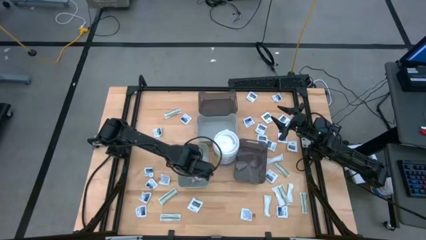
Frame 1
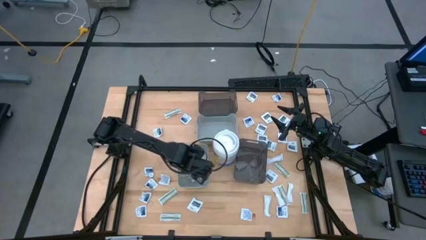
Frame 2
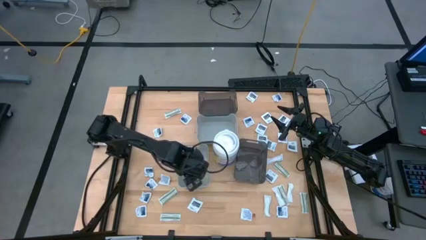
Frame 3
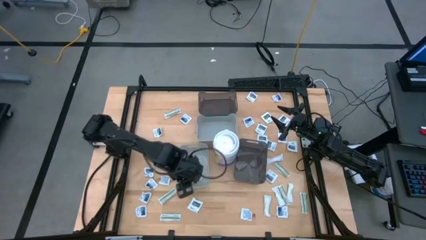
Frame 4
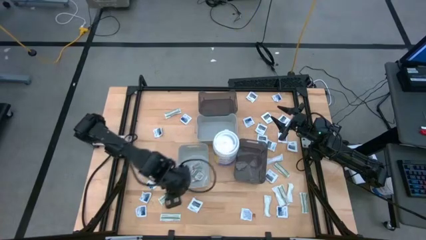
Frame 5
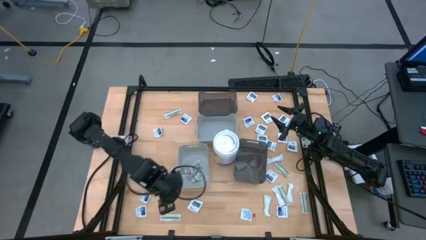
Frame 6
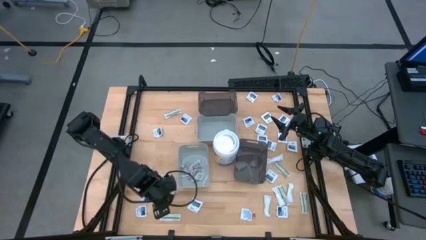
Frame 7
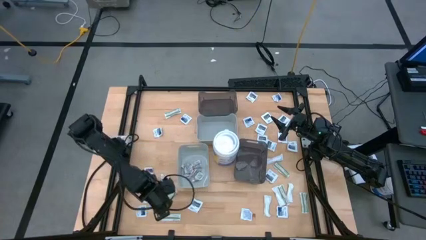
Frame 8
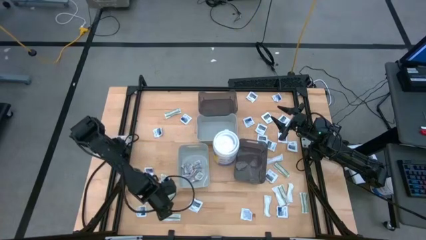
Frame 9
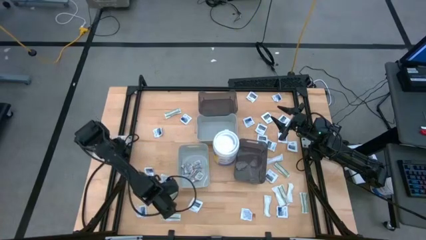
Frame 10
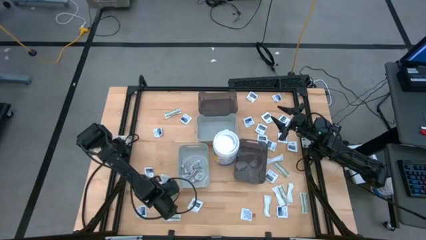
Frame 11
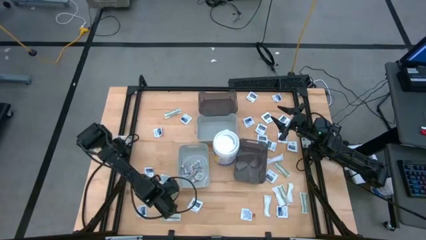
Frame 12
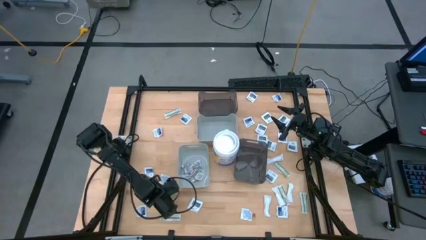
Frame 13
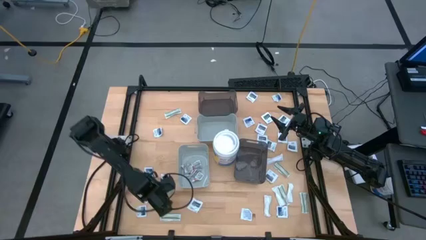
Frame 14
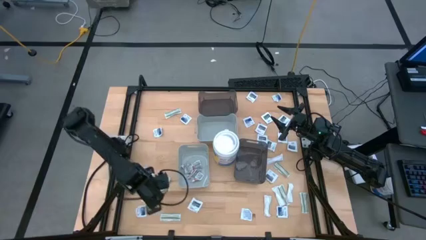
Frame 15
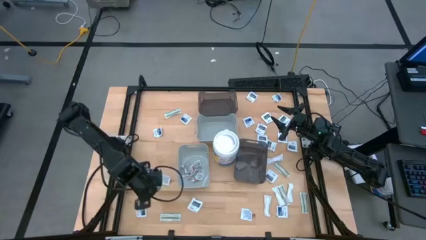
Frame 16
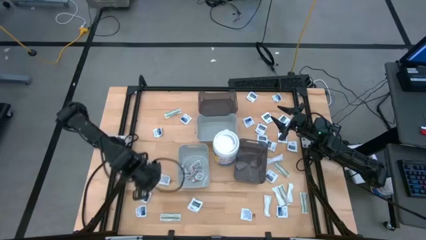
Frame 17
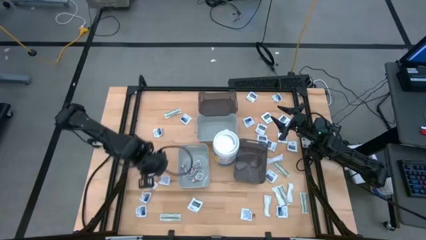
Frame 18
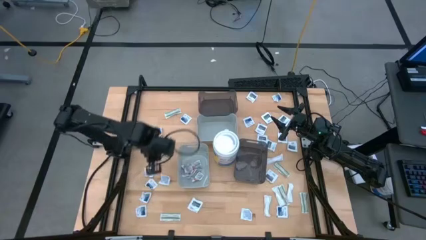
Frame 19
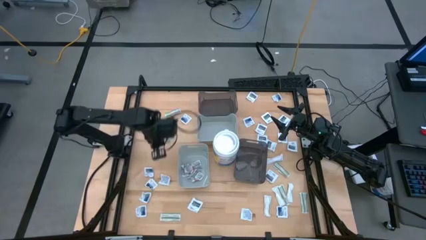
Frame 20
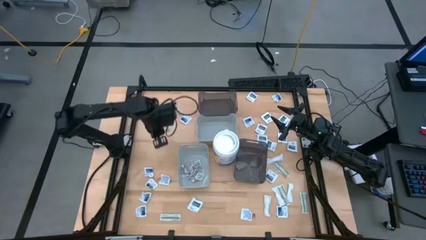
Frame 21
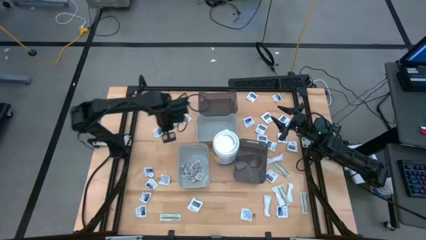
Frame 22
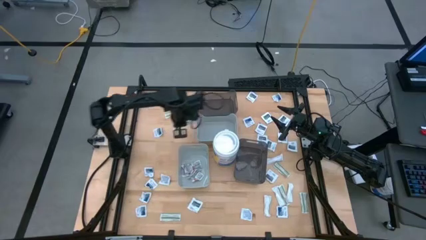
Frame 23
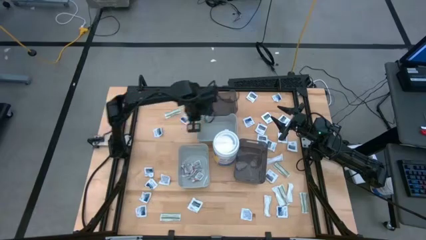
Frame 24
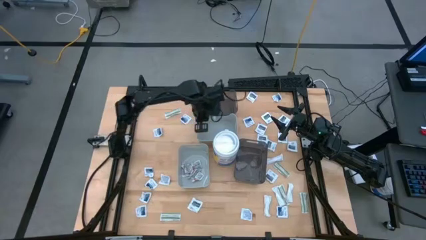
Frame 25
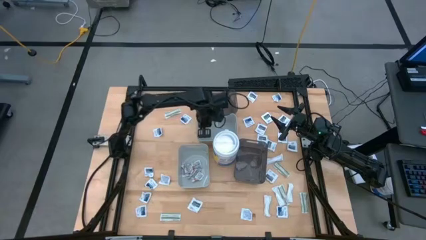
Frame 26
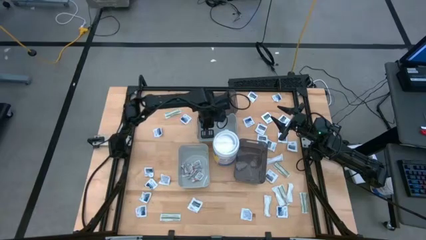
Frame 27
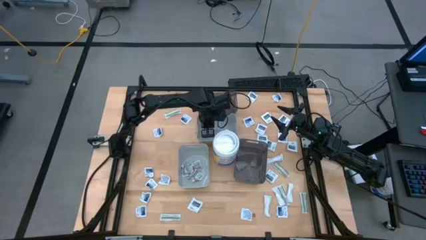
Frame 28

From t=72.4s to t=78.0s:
Task: Pick & Place First Aid Supplies
Put the bandage into the top gray bin

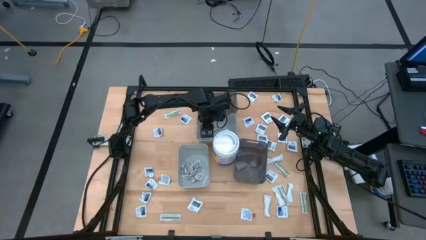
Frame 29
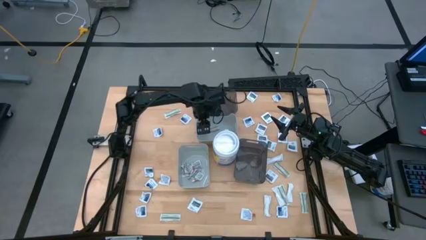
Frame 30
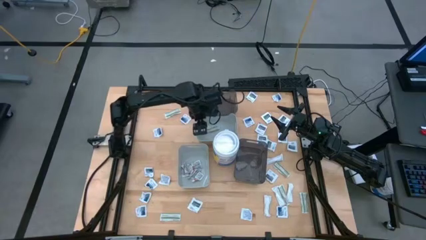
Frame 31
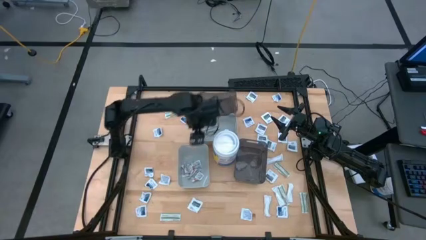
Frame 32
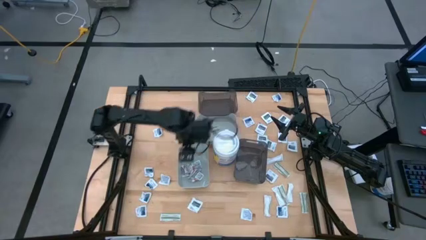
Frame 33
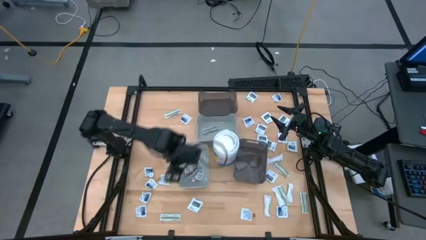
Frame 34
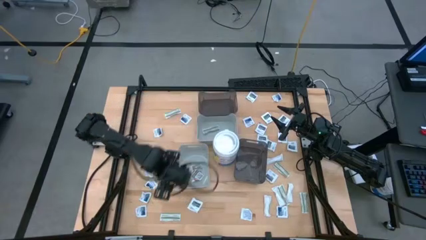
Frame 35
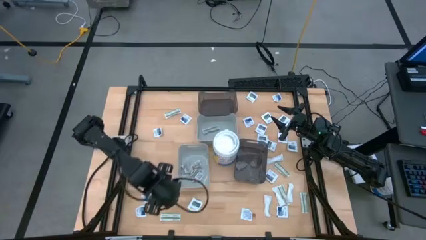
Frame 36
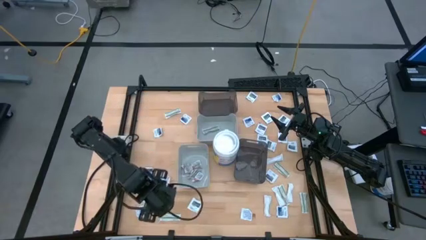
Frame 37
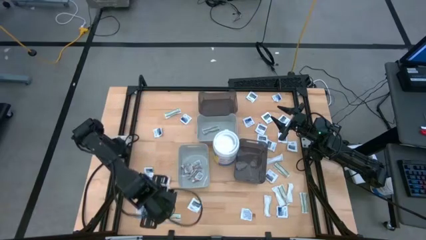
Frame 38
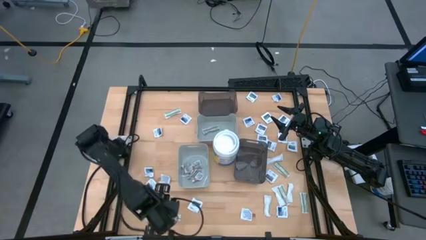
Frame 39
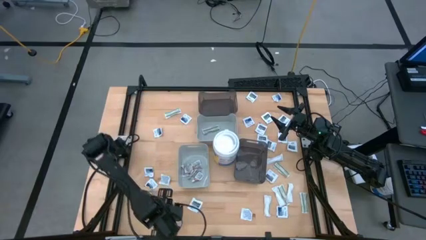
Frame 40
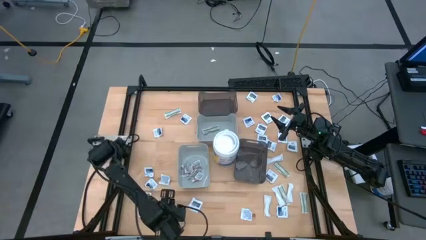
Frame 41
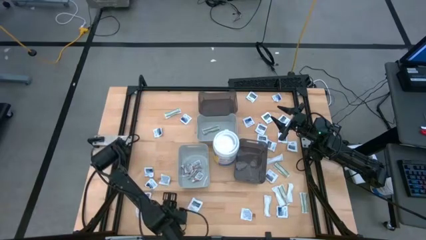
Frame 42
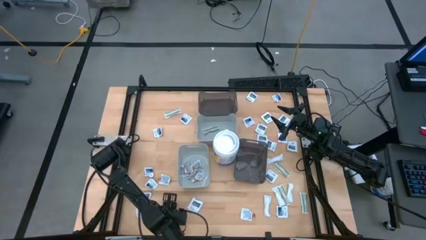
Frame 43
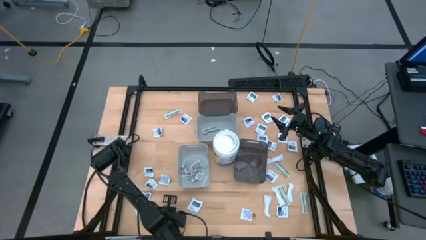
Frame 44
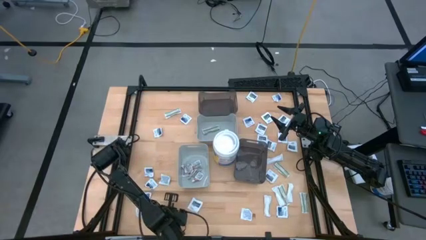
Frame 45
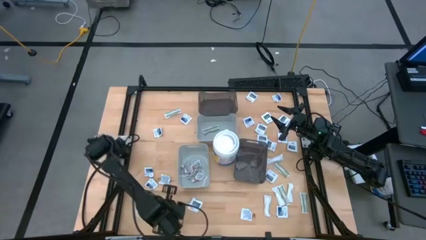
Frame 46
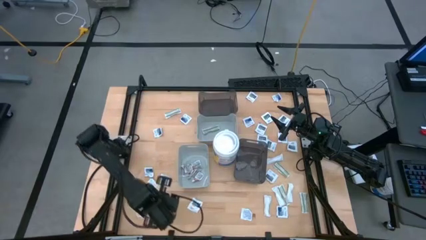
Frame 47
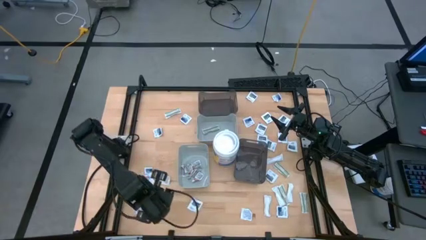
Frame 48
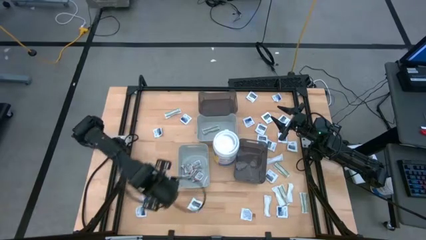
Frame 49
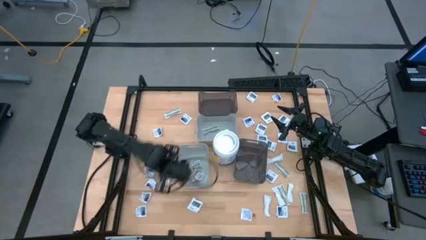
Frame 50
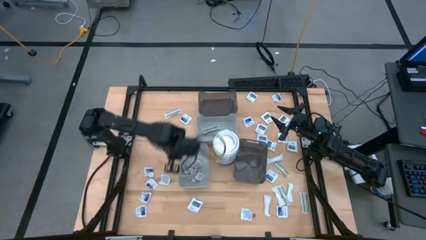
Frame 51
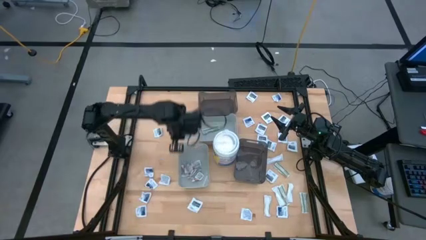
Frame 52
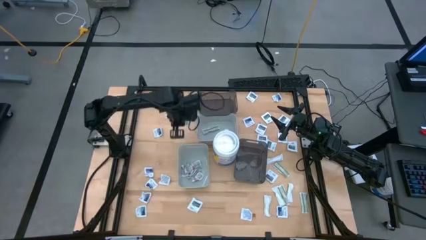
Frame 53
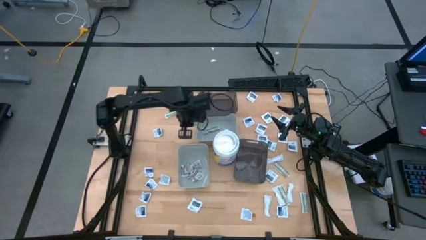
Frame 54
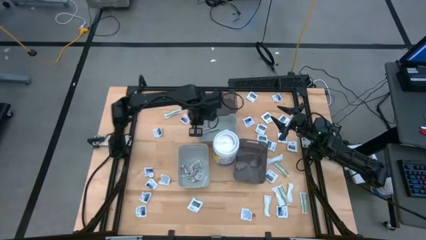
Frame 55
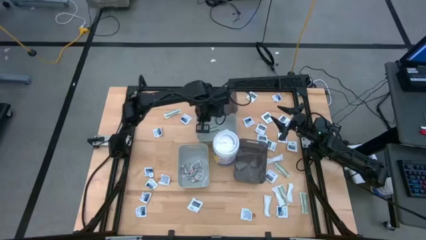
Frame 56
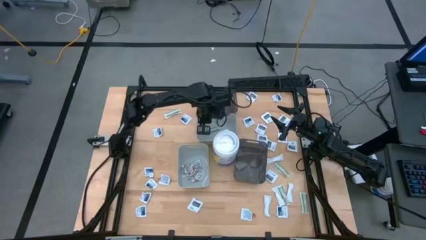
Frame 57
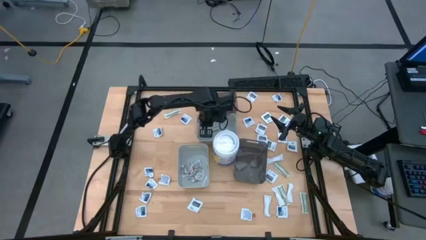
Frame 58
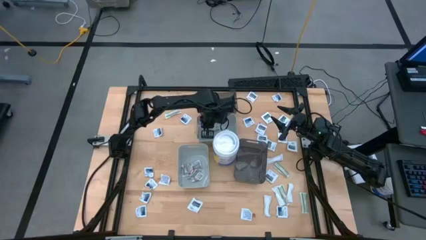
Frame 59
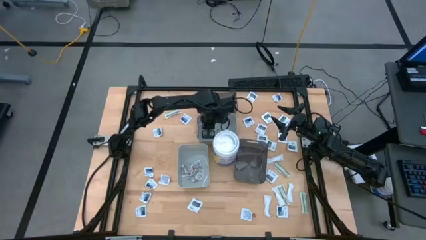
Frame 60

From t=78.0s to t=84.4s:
Put the bandage into the top gray bin

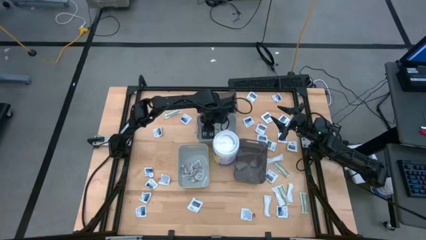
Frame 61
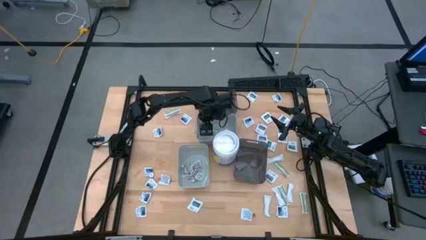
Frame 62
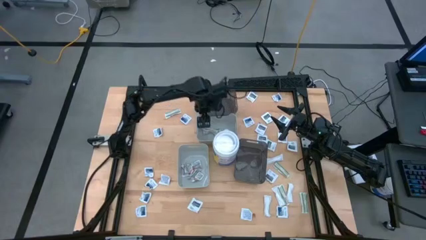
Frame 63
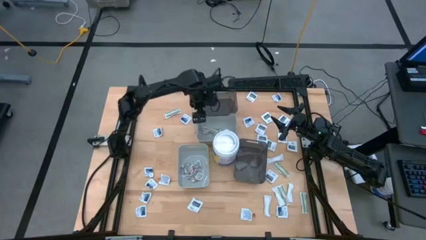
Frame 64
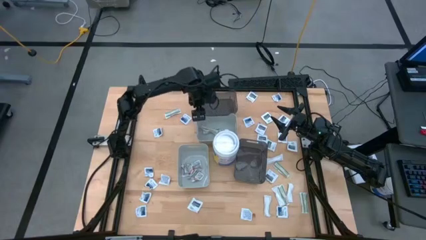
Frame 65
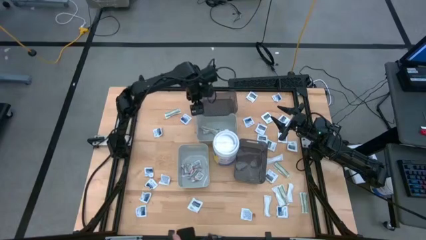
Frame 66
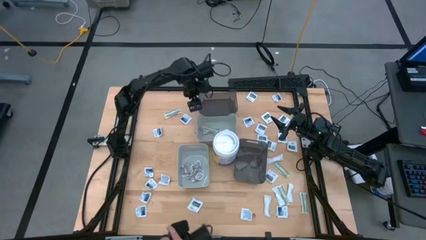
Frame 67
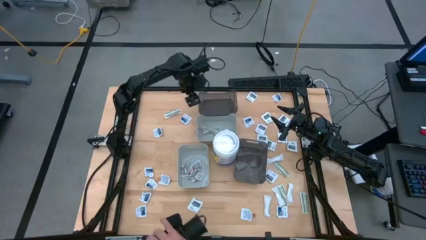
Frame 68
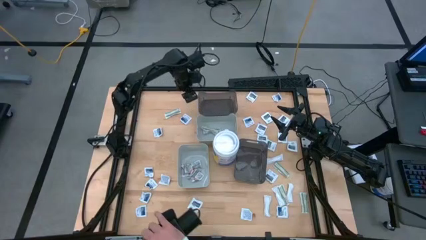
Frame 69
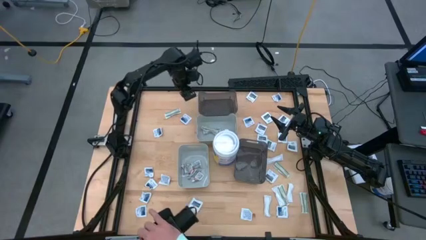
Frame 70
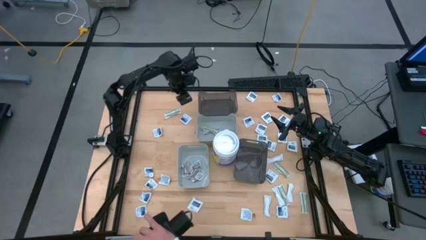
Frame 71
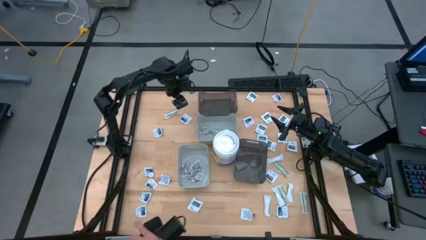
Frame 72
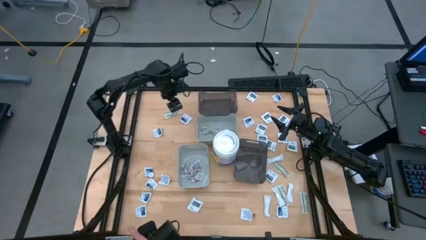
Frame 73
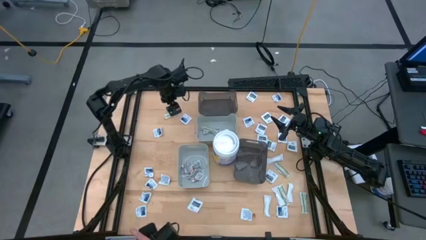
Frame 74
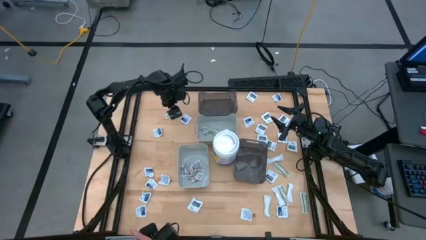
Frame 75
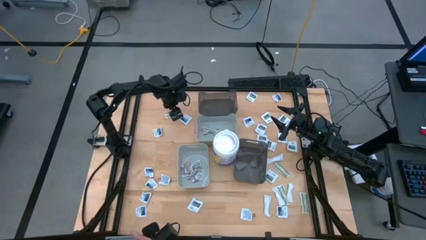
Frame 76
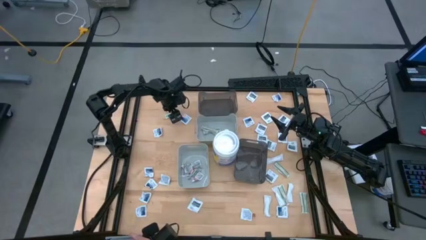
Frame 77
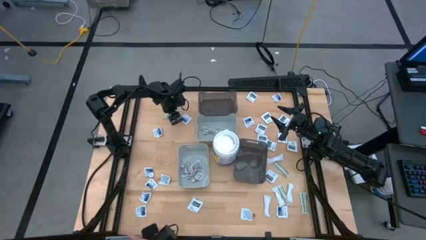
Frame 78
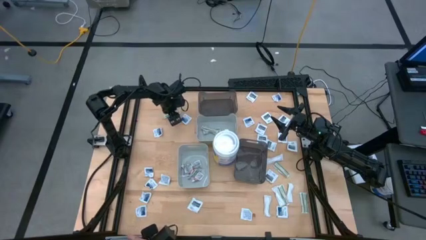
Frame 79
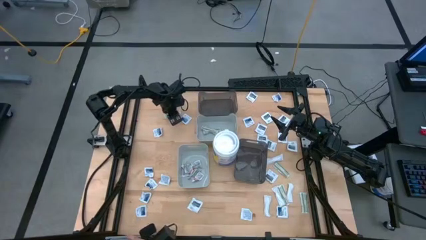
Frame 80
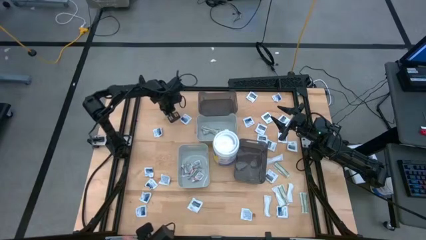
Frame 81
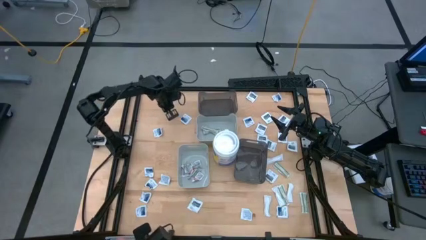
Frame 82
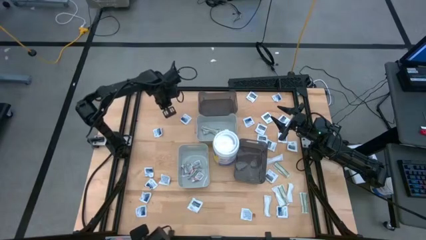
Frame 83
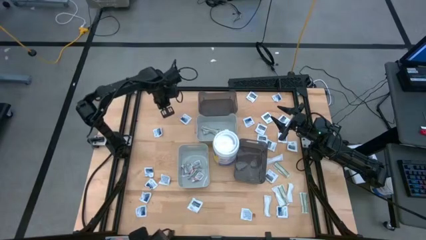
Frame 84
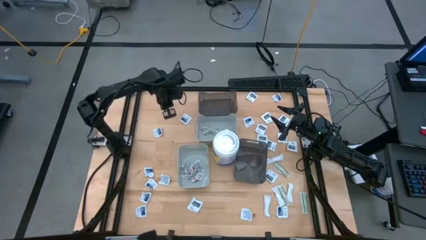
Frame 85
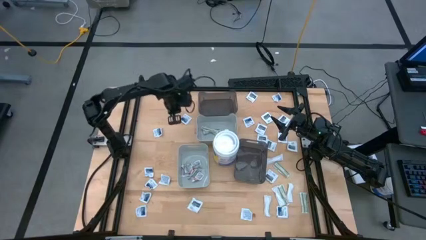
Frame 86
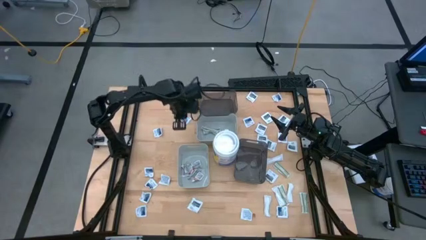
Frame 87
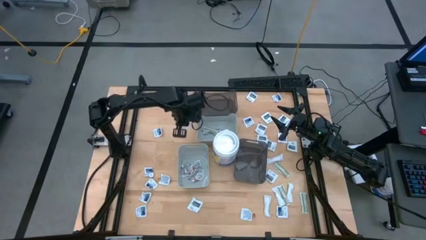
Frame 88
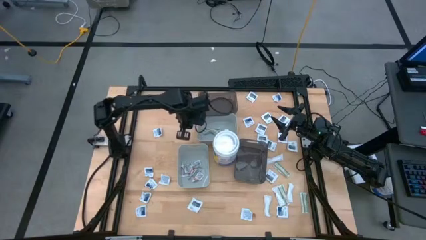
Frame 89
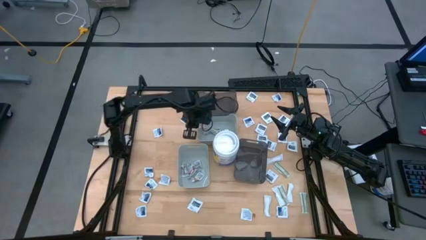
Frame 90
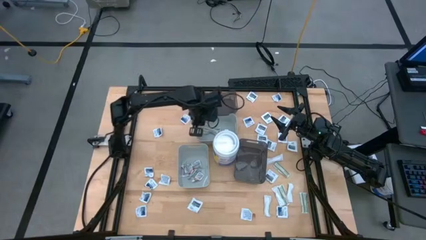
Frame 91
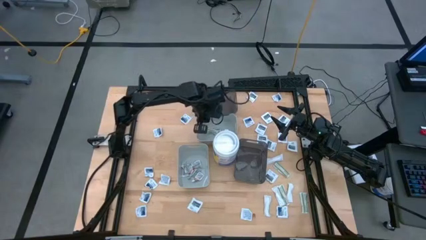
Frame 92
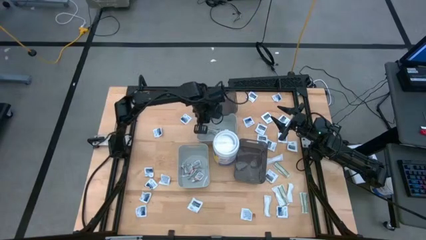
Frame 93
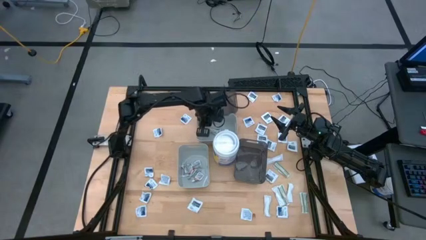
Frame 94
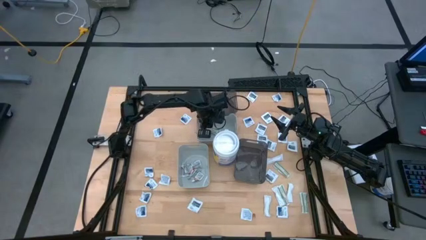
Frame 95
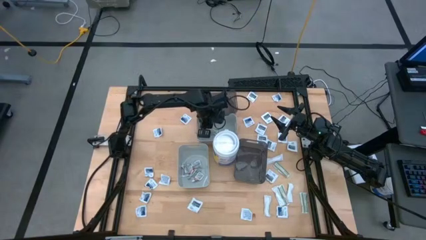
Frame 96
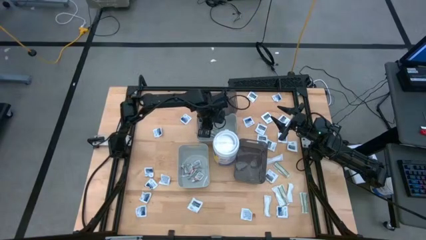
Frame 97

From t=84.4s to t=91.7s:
Put the bandage into the top gray bin
